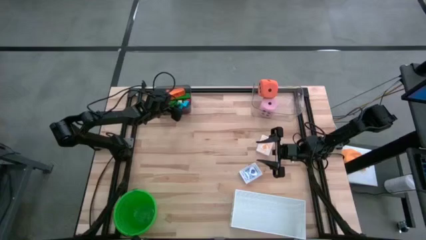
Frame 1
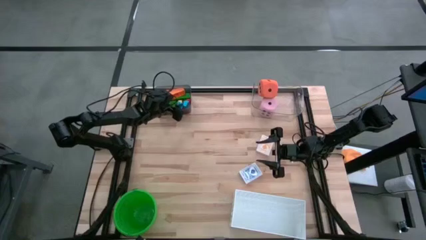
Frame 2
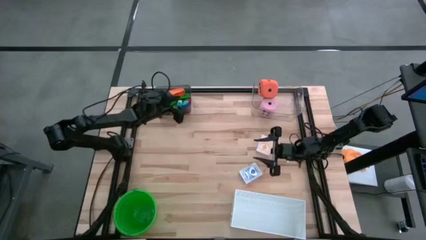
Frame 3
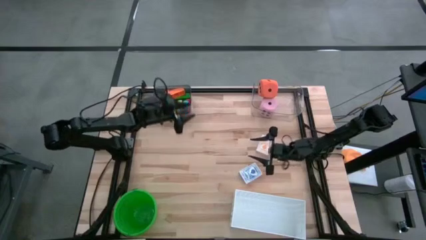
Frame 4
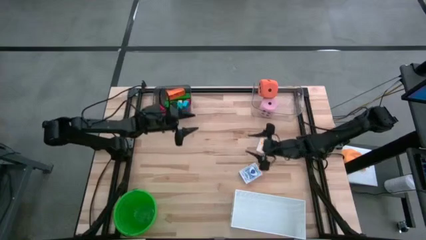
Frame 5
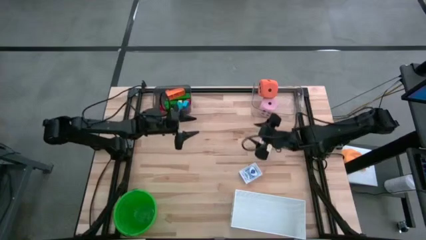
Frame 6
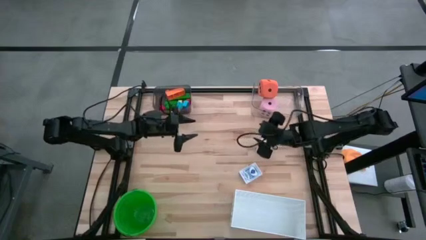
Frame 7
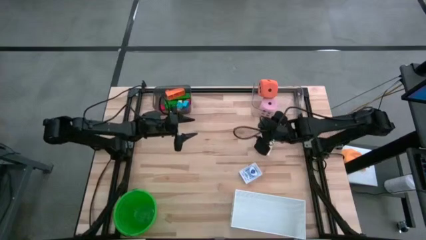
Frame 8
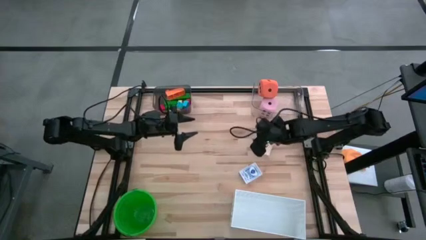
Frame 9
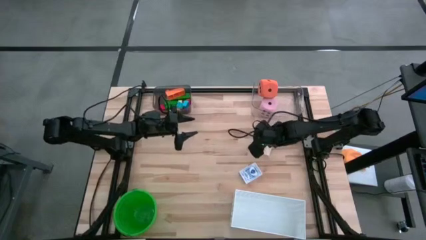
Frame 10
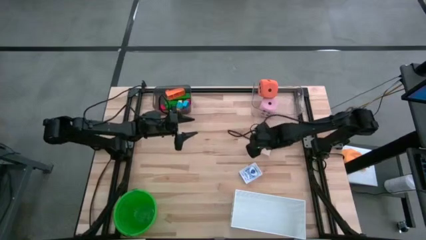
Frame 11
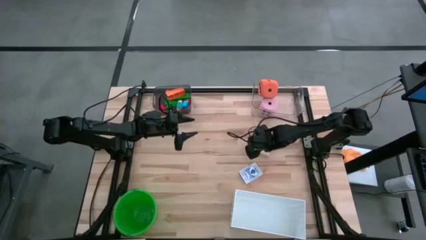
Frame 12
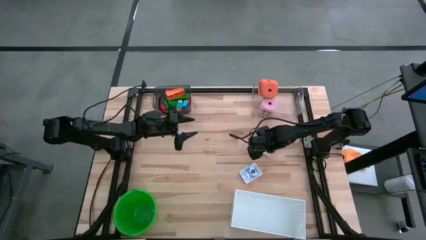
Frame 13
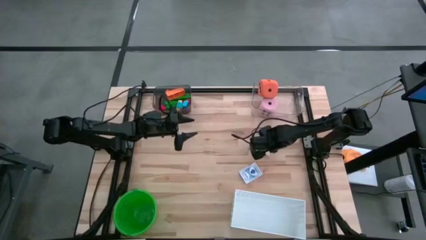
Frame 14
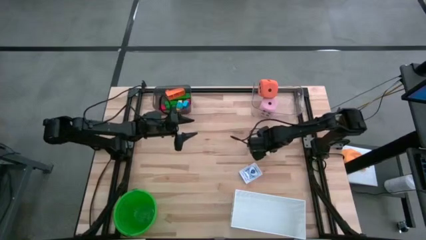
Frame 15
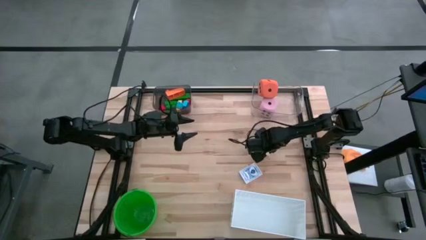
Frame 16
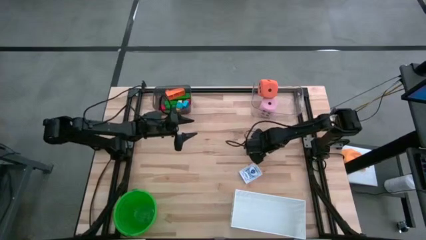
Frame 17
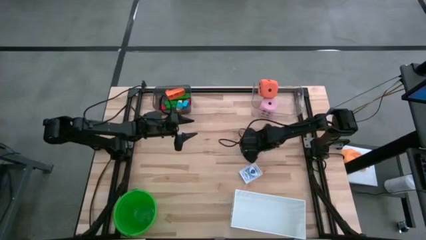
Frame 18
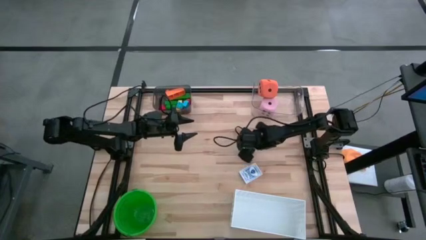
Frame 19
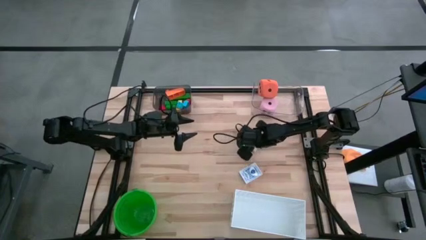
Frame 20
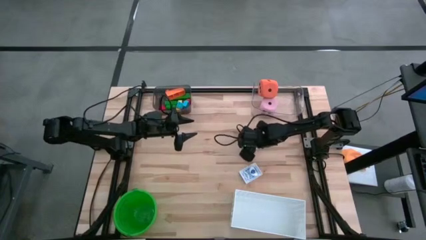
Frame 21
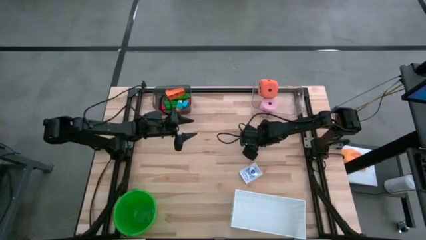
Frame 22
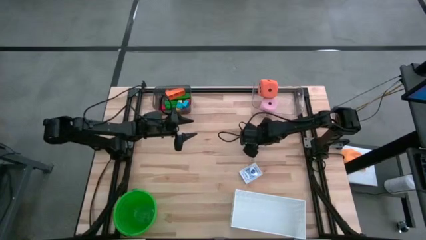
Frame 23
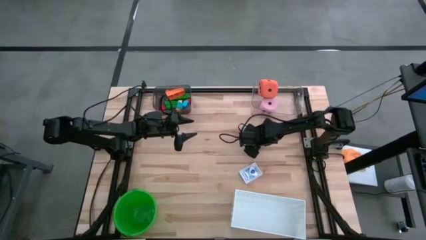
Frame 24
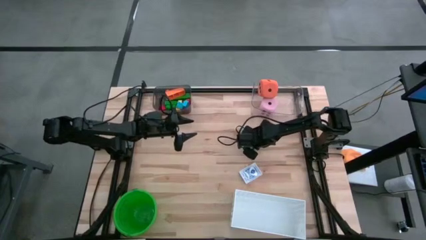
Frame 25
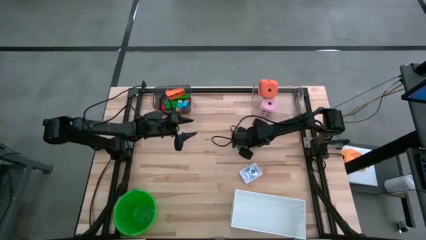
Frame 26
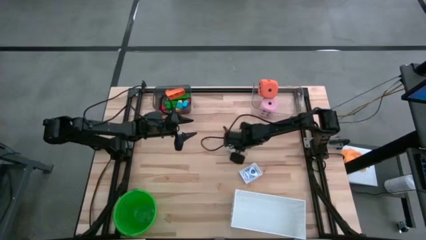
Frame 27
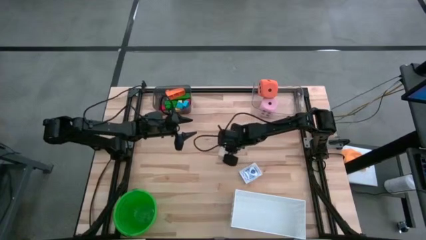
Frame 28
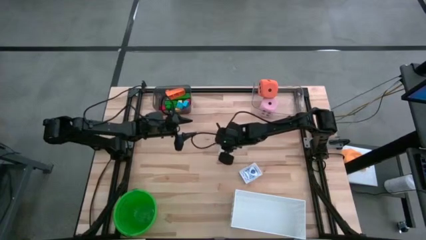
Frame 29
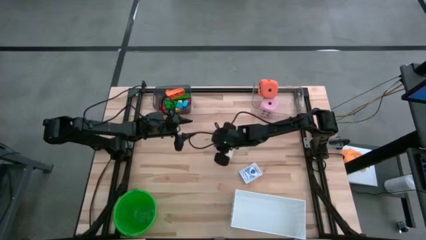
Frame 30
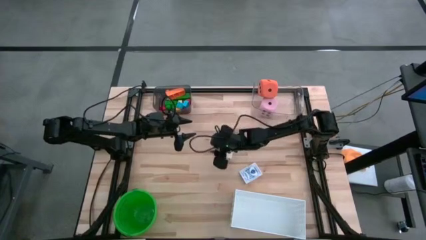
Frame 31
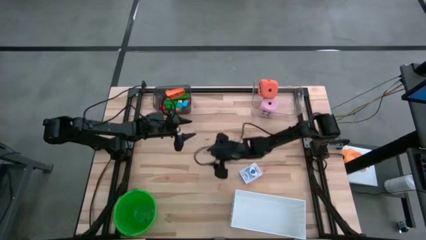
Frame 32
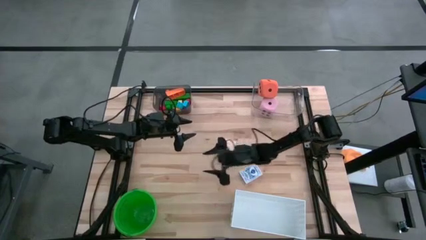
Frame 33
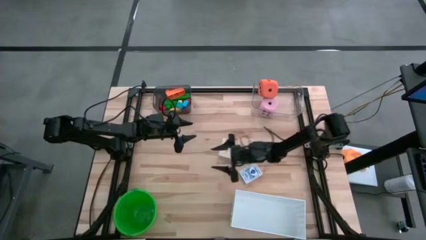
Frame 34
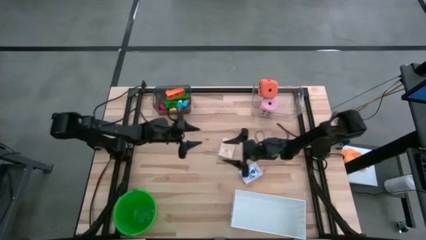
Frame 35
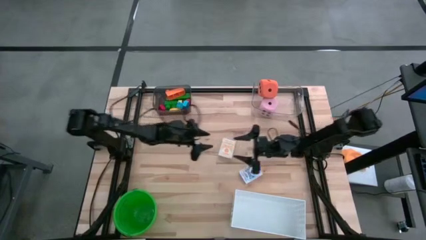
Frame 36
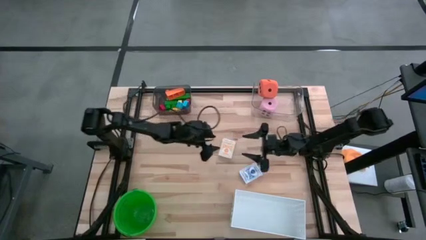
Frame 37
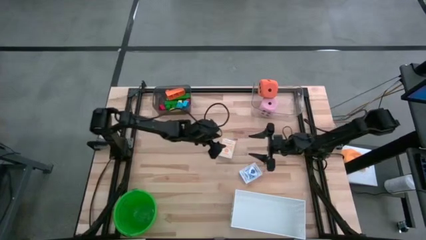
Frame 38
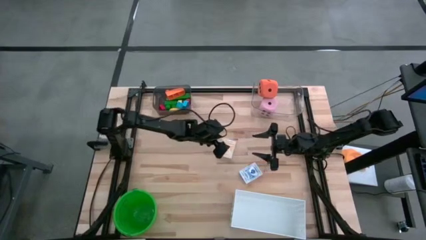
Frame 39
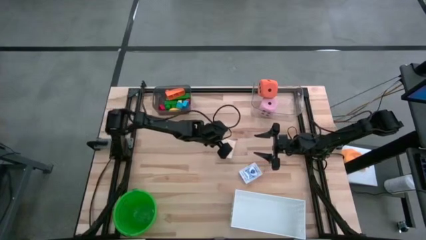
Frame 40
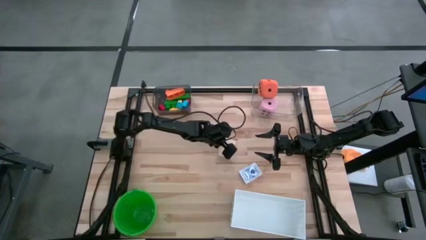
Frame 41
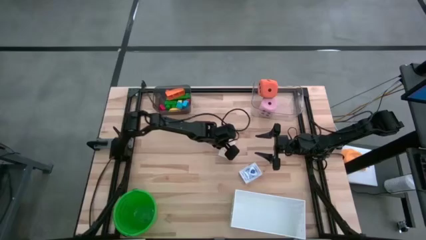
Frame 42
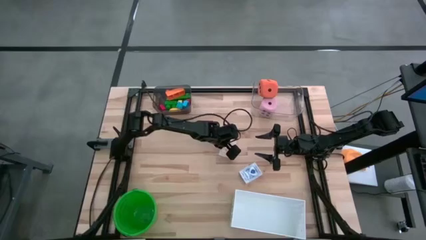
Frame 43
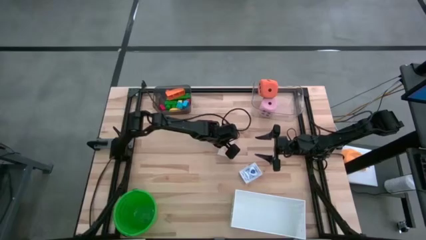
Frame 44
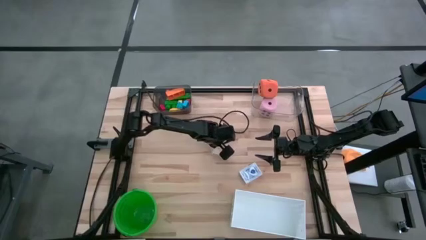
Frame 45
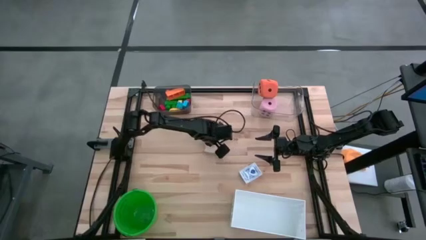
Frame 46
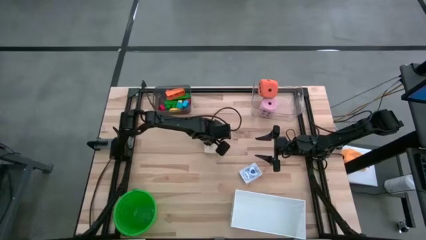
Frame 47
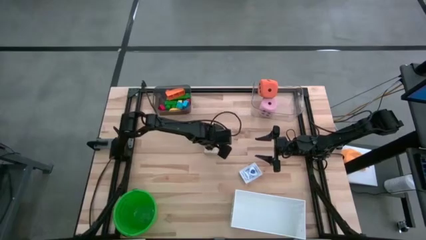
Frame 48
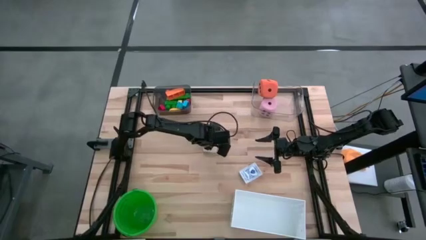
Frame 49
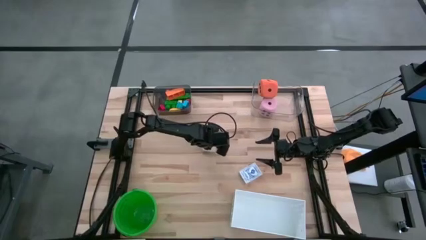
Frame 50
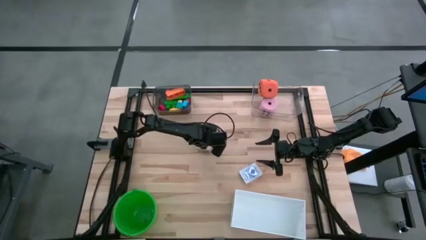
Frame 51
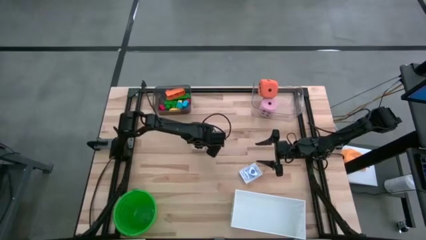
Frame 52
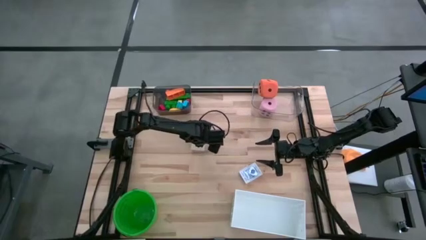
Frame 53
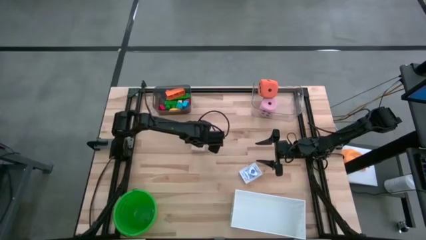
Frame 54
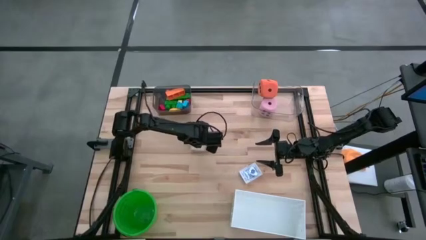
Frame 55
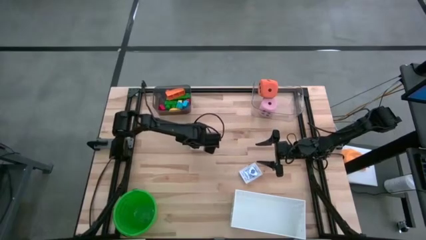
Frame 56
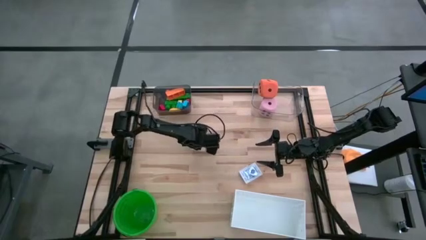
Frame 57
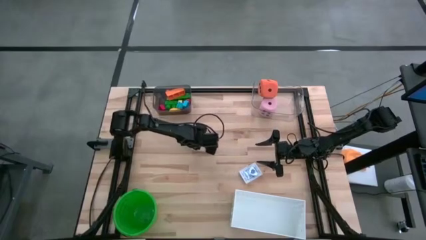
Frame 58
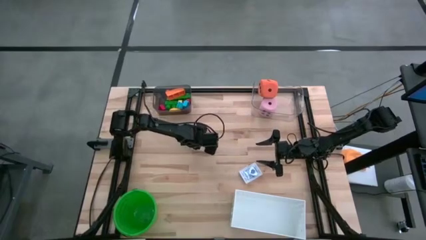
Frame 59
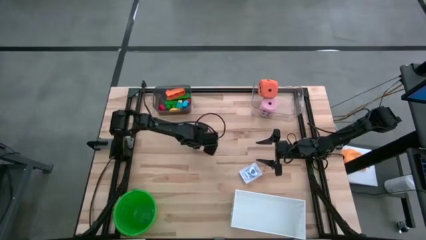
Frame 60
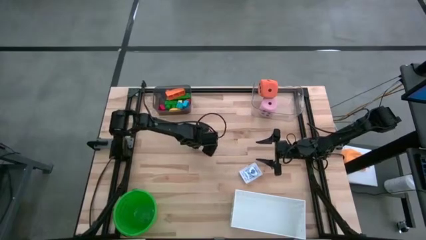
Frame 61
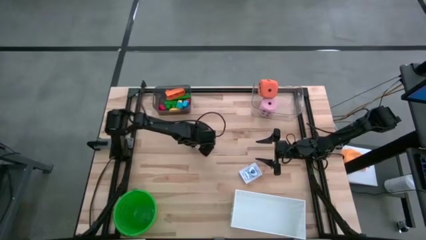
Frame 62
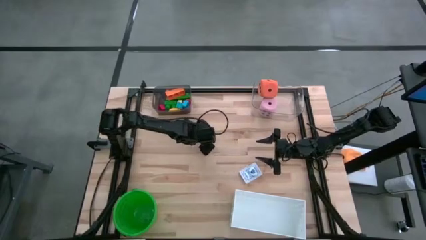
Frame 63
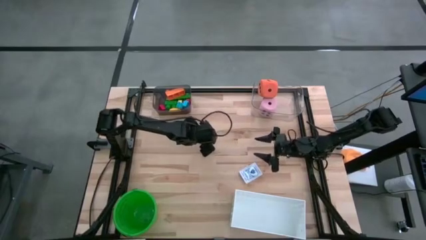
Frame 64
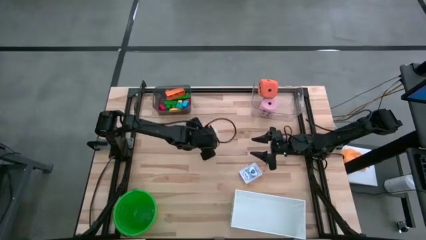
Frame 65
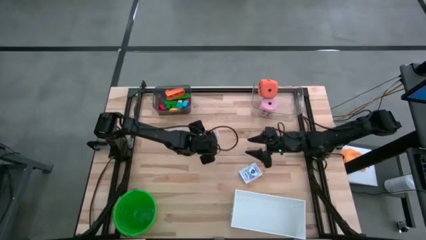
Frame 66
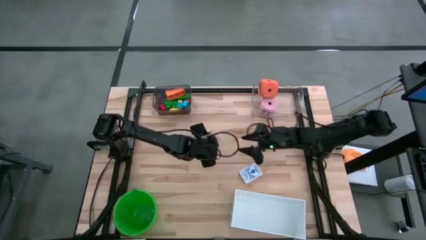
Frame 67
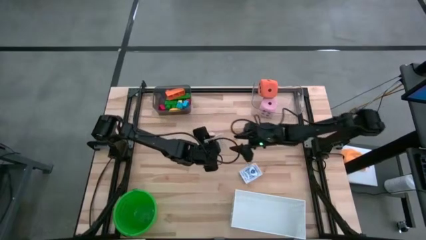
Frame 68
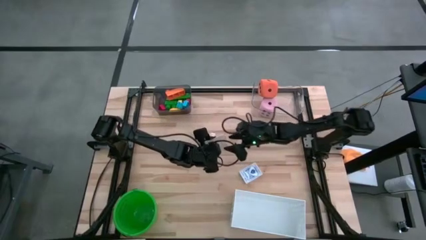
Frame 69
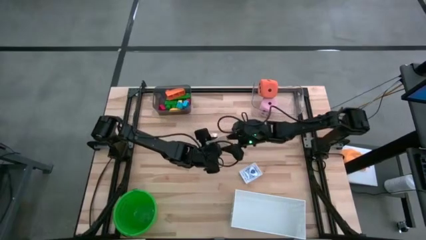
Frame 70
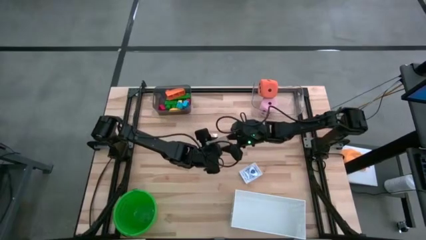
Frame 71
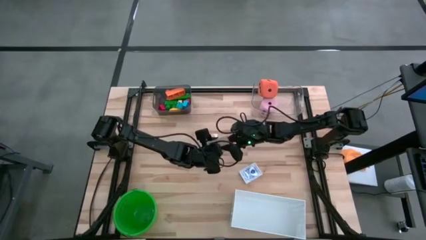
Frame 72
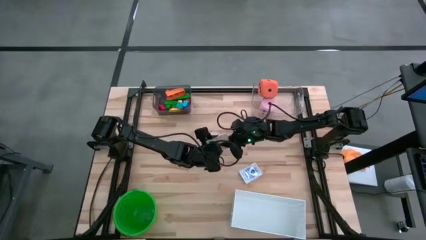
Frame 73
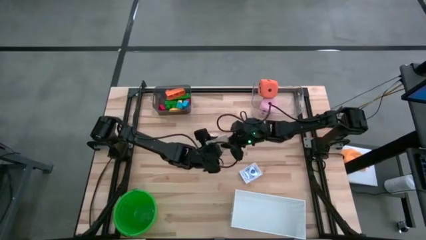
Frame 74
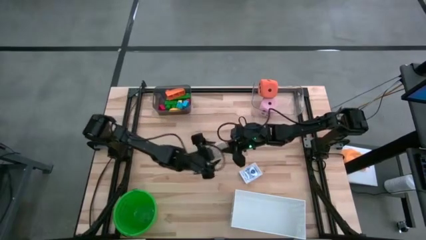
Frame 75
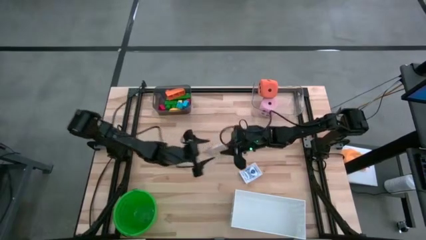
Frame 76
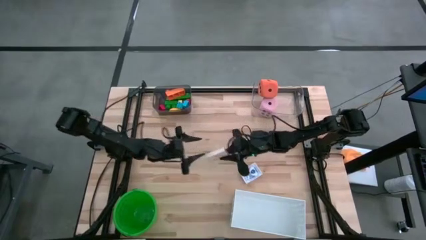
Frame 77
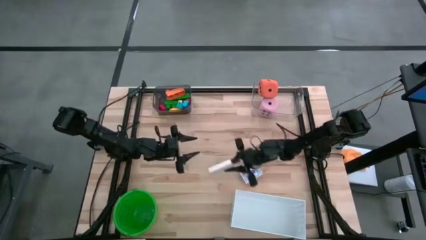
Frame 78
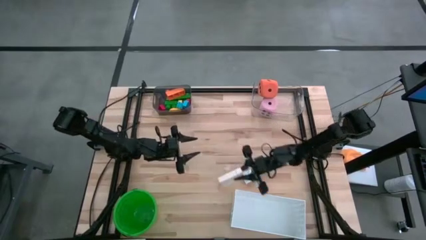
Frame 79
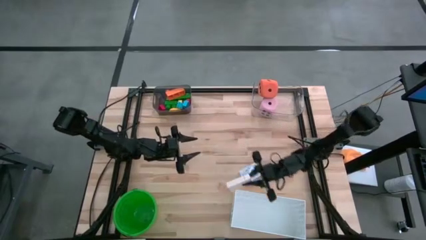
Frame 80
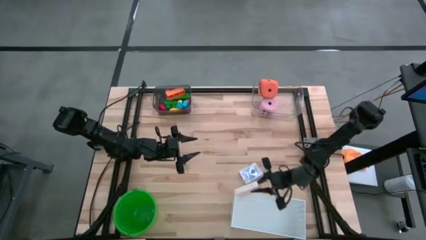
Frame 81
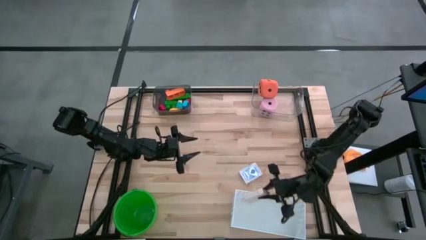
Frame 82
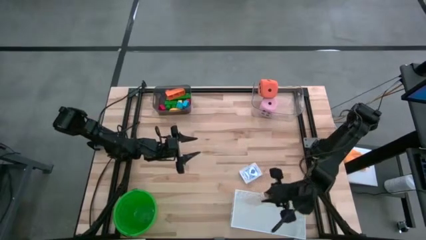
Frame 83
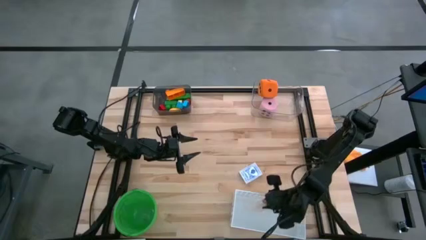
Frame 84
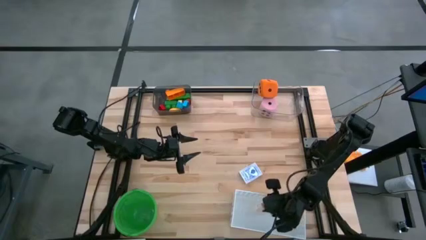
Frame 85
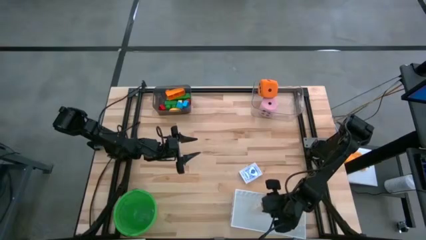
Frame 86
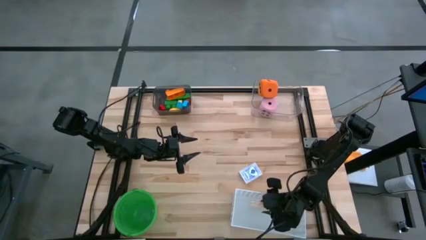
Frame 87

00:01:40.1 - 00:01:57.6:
Task: Pick & Place Toys
Put the yellow deck of cards into the white bin
